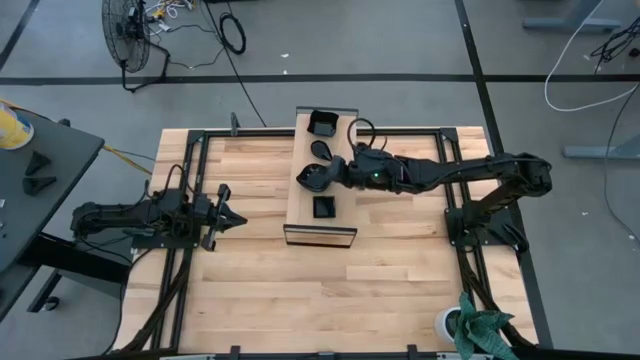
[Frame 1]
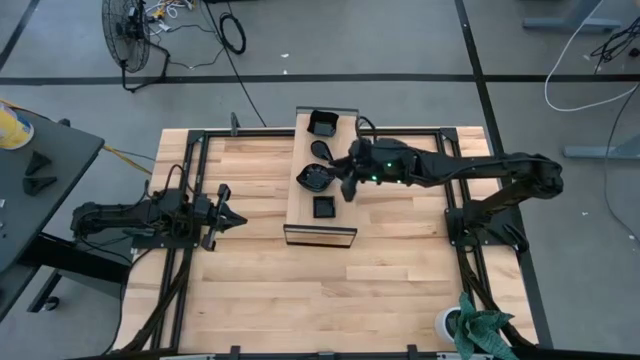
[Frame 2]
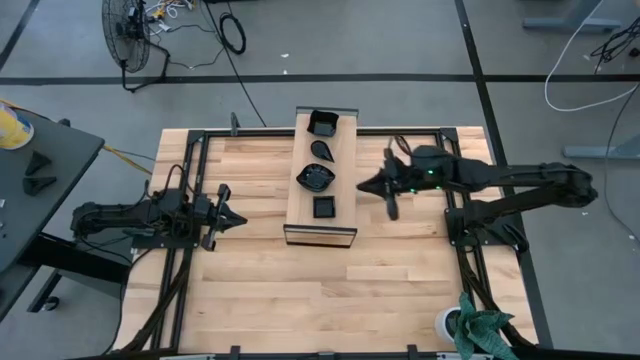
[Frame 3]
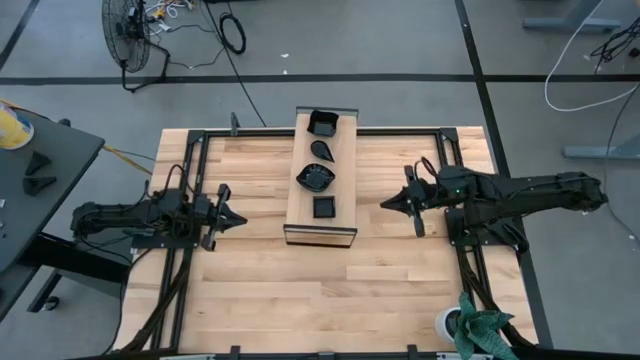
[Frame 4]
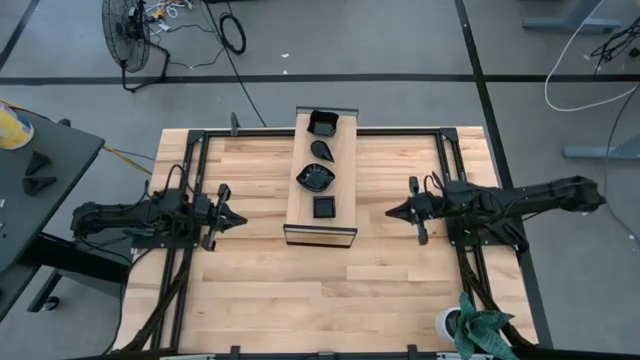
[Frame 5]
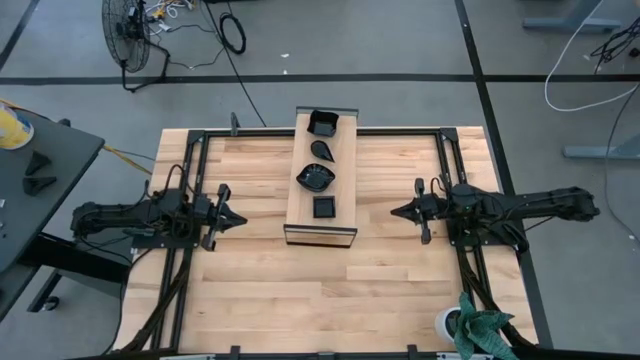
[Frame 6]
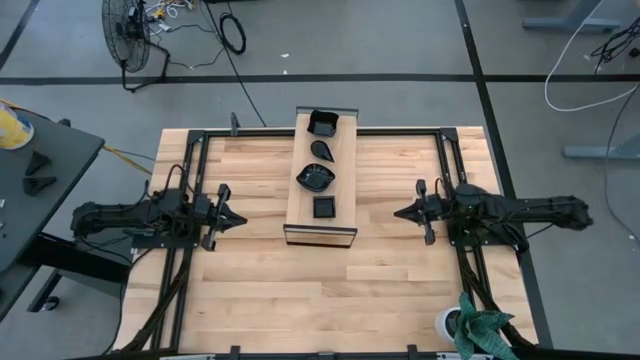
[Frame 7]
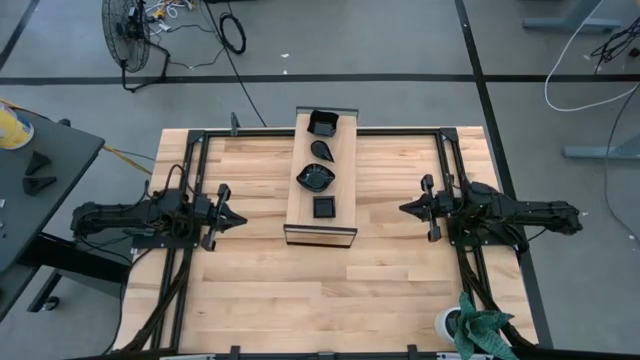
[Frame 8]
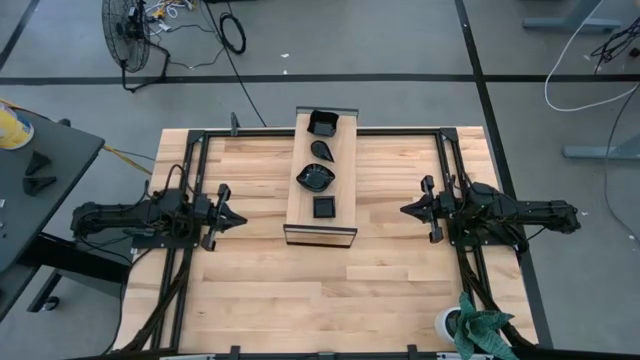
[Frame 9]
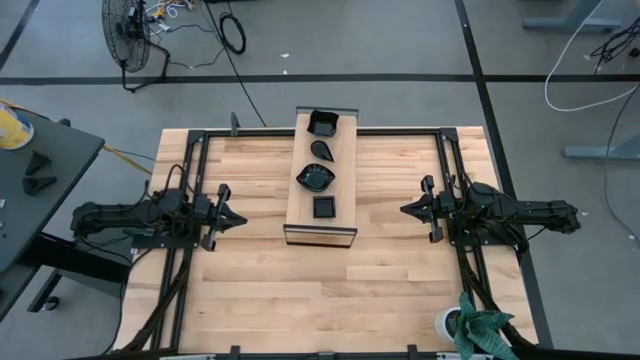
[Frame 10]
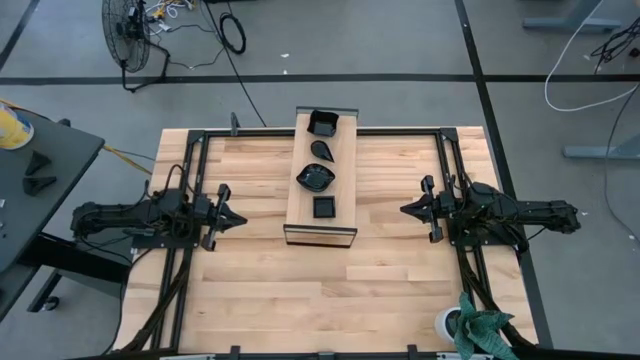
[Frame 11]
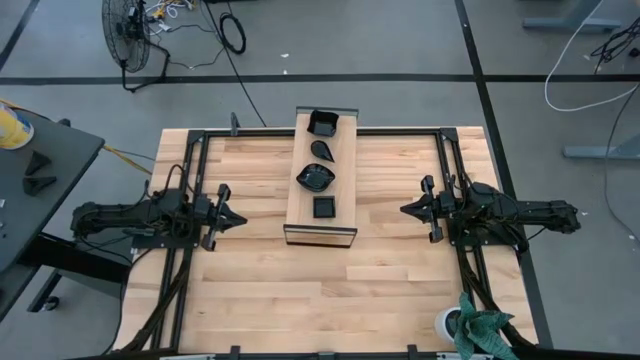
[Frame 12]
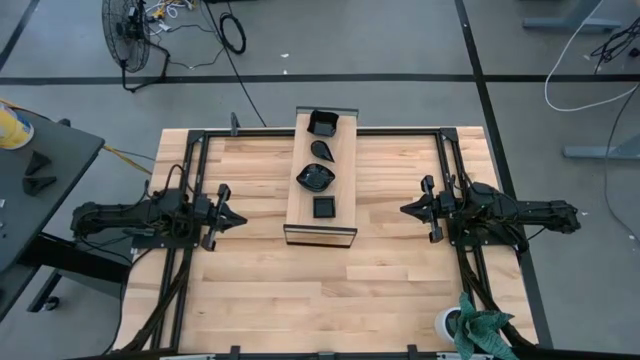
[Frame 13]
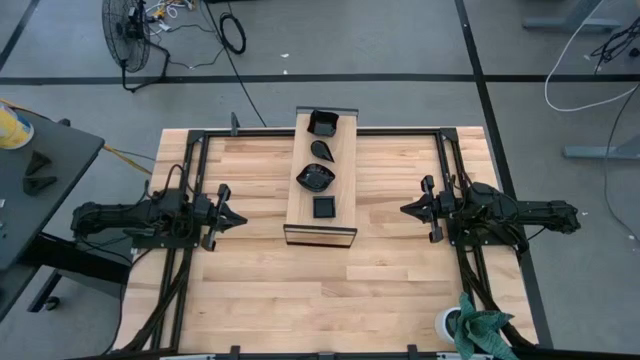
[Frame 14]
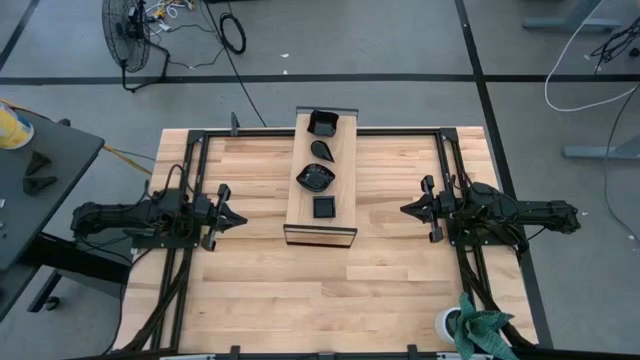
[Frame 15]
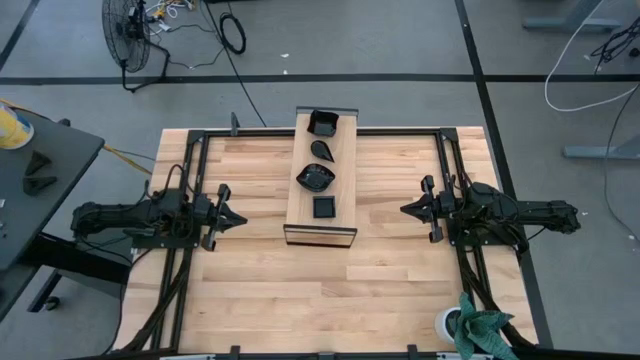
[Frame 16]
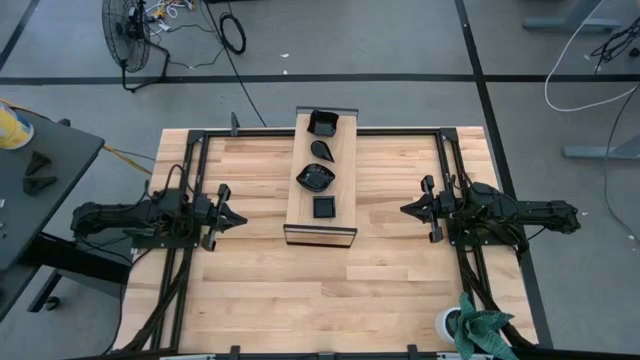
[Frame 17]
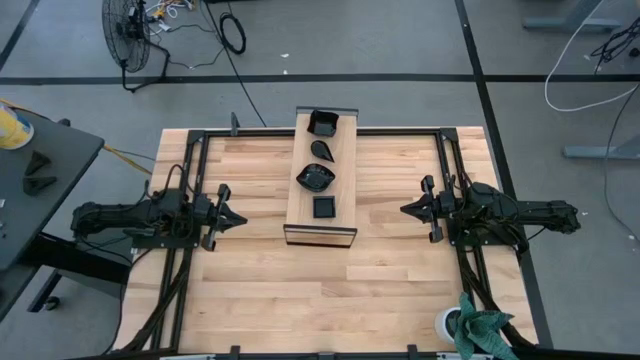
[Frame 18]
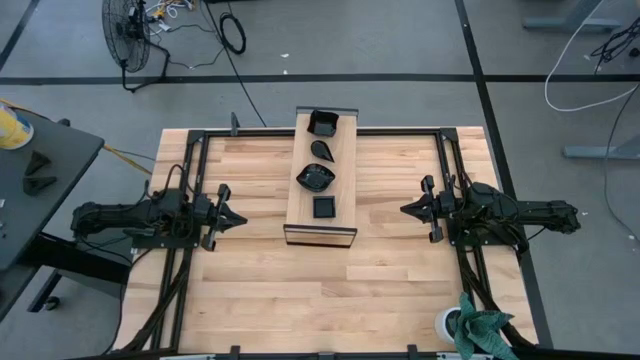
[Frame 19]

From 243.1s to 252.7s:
Task: Pick & Place Mini shaped plates
Return to Home Position

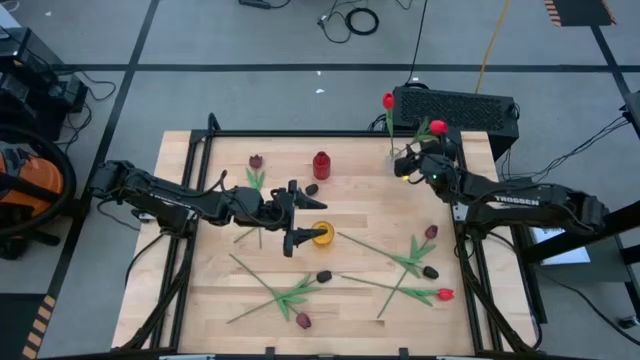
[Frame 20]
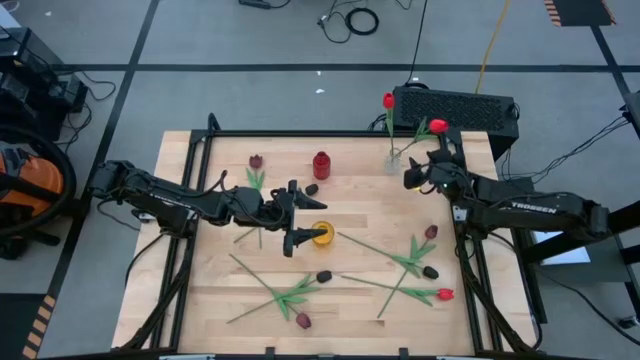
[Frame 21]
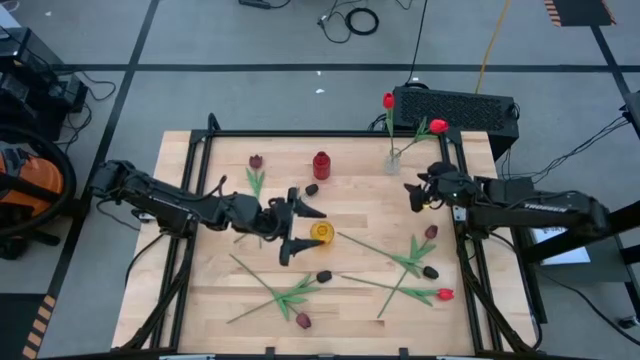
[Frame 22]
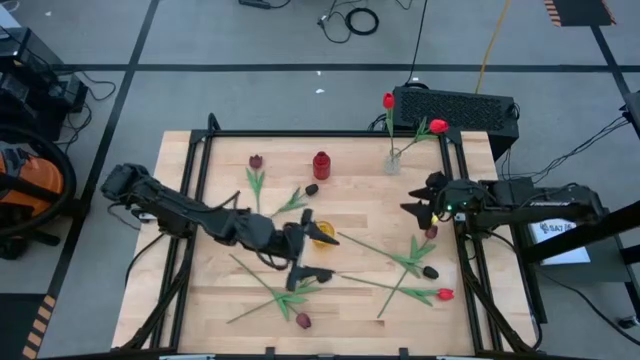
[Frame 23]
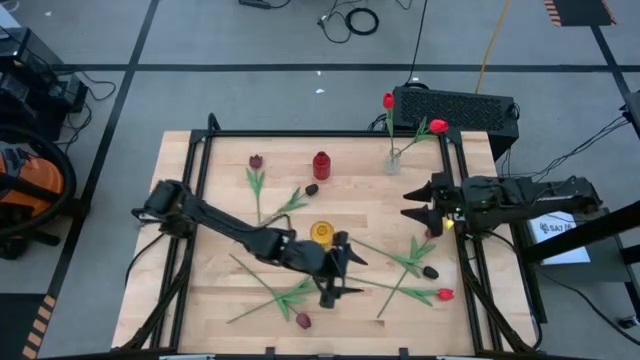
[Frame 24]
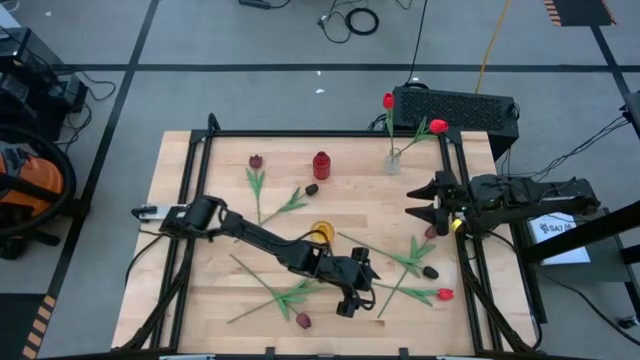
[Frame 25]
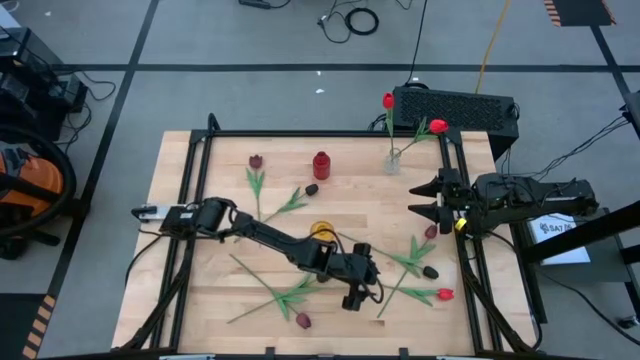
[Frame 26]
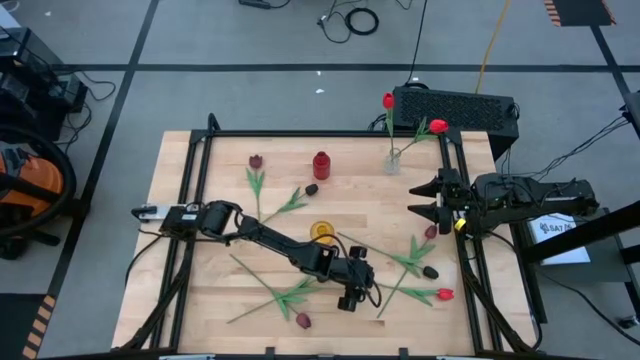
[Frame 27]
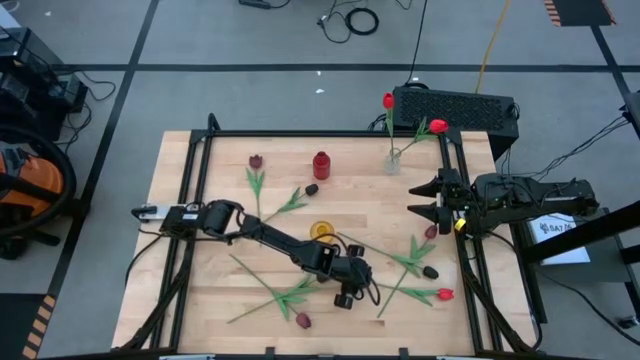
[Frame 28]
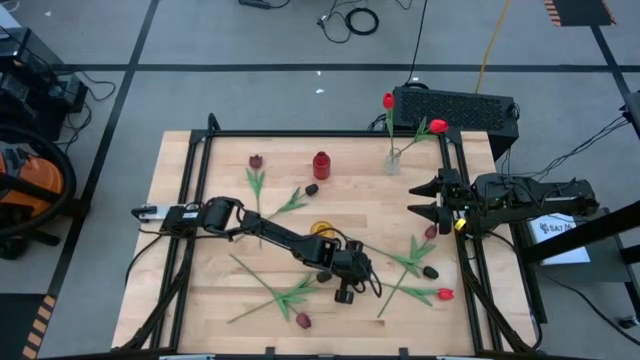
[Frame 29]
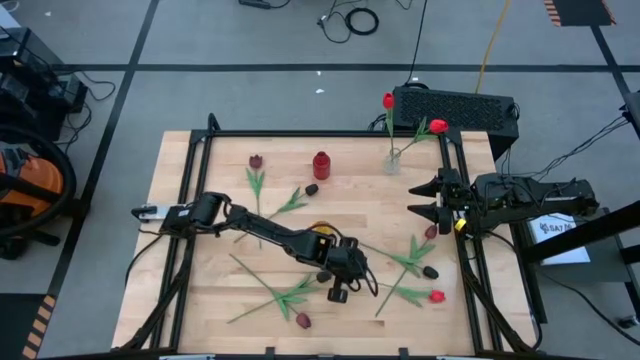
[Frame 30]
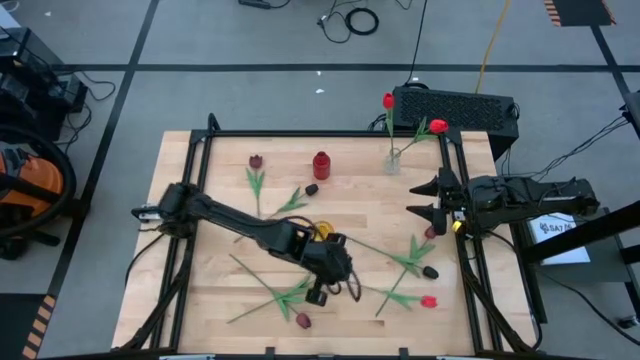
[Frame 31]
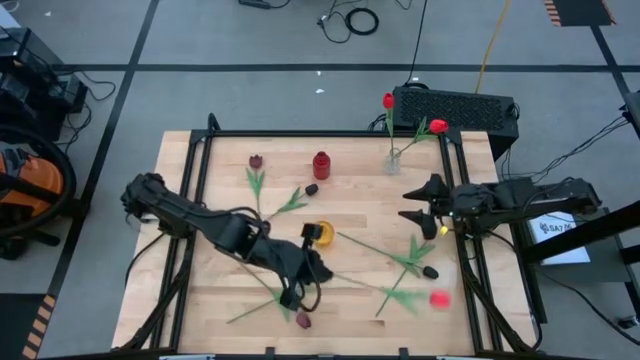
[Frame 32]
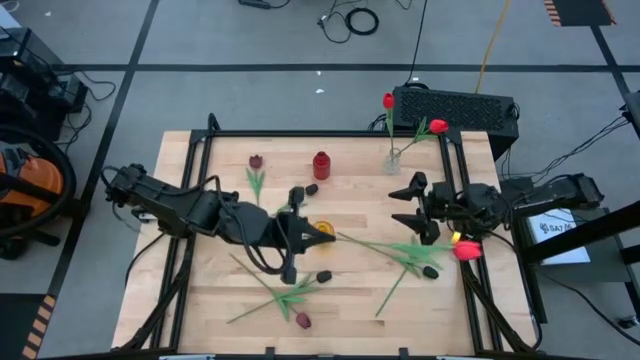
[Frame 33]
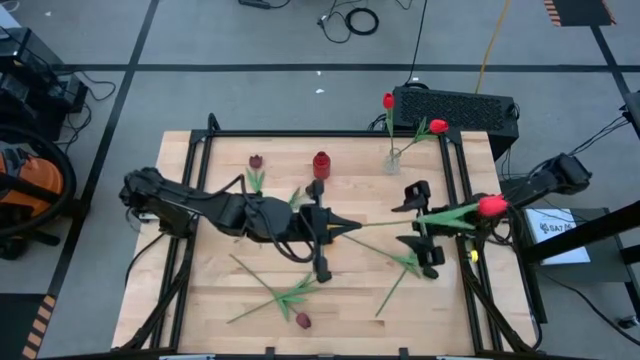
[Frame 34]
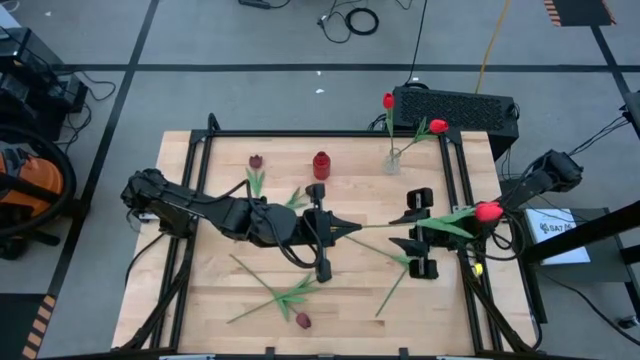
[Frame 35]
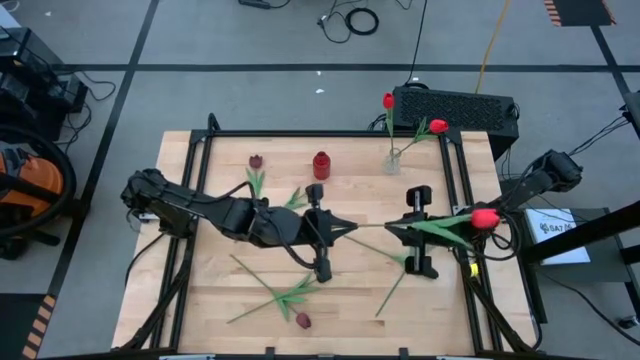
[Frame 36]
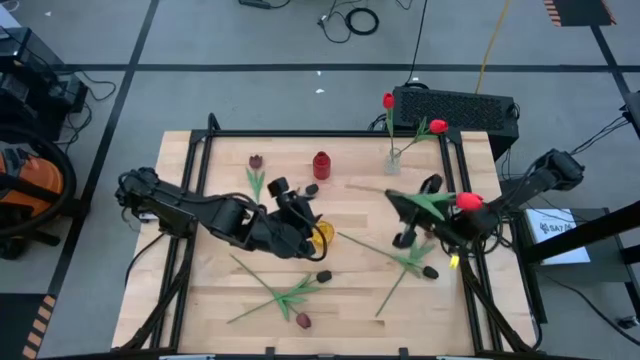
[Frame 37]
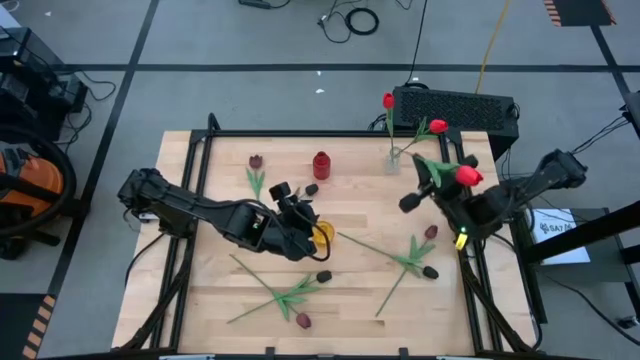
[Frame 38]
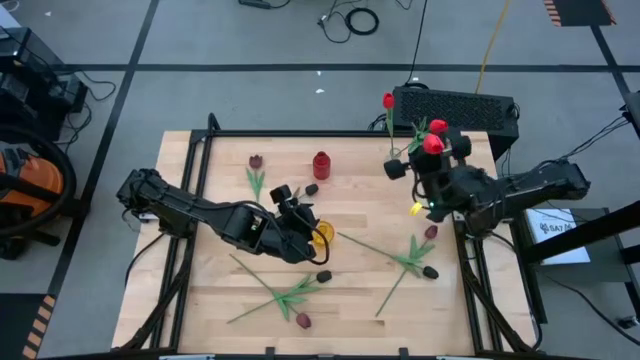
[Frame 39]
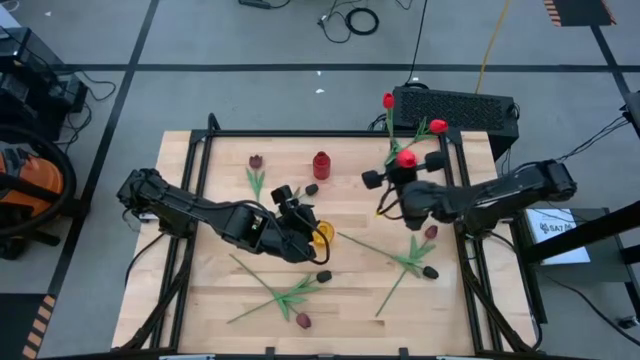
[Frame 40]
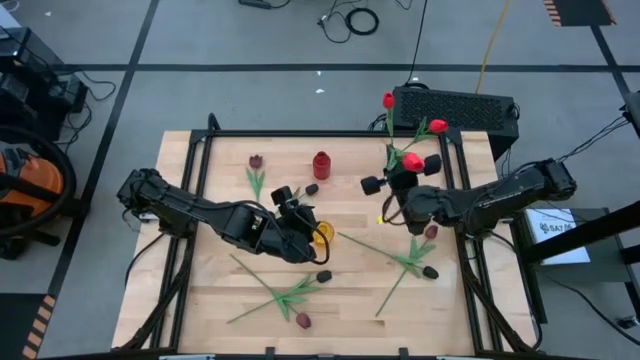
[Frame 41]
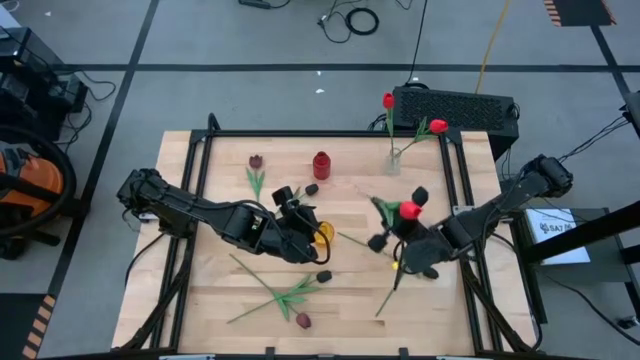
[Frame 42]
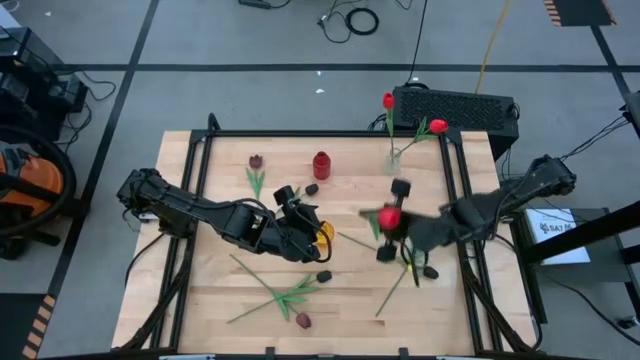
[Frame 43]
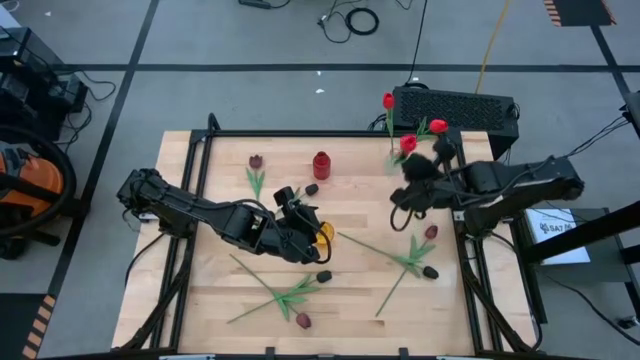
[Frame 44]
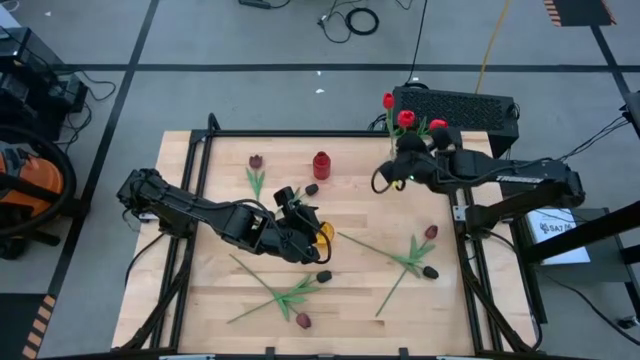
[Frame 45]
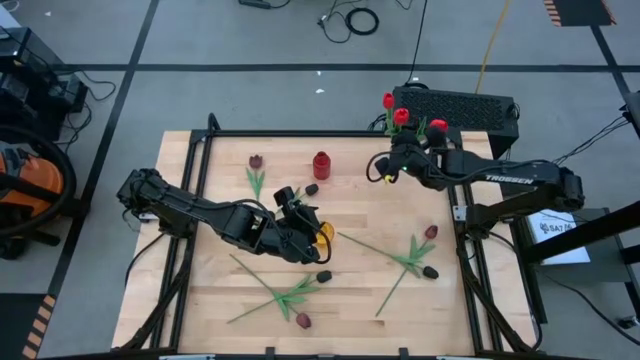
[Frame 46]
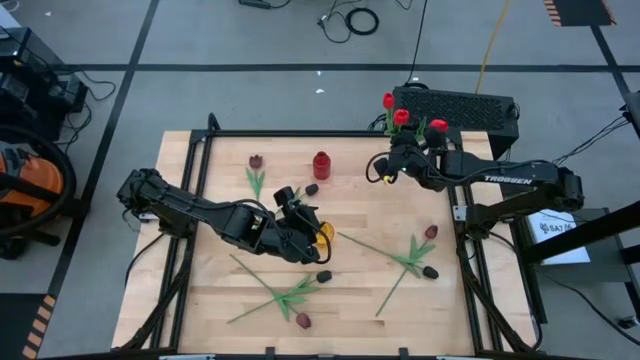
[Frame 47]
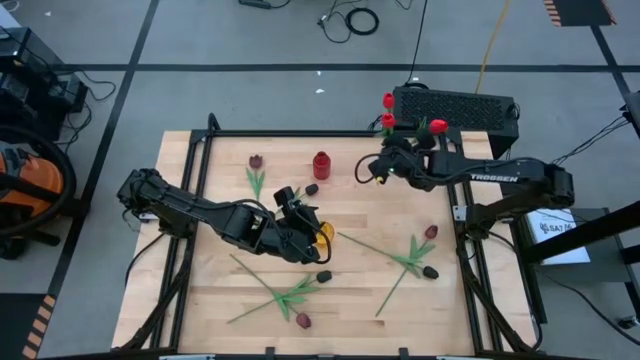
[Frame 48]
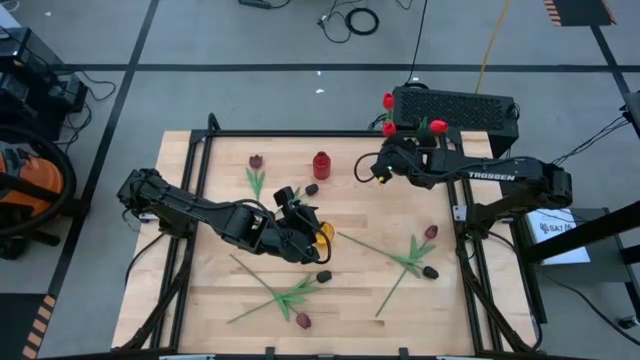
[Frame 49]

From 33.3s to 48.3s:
Task: Sort flowers into vase by color
Put the red flower into the transparent vase
